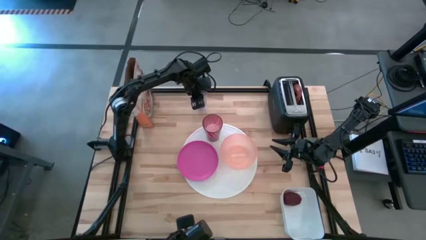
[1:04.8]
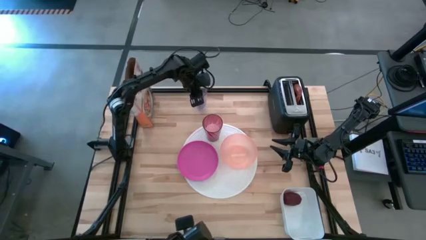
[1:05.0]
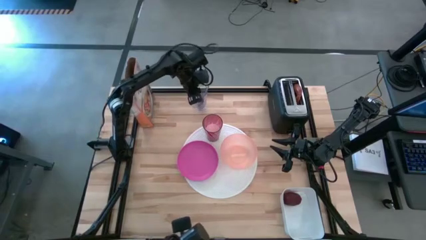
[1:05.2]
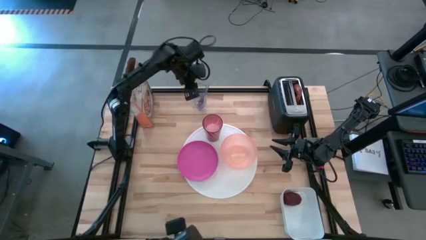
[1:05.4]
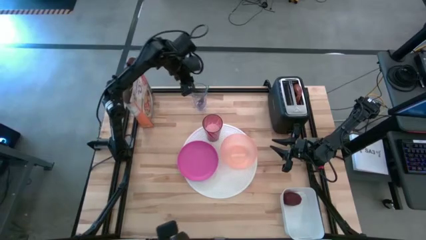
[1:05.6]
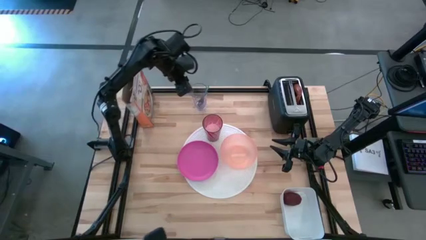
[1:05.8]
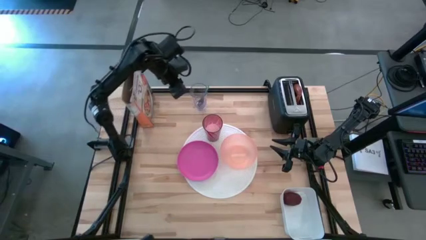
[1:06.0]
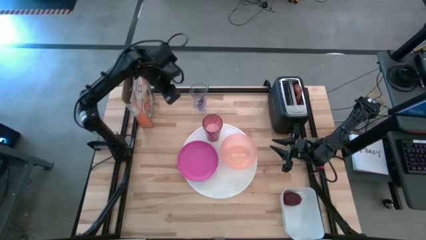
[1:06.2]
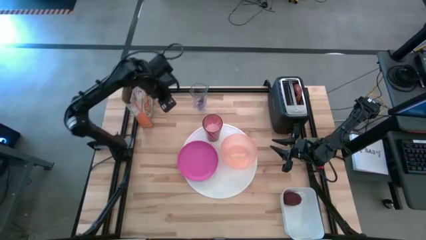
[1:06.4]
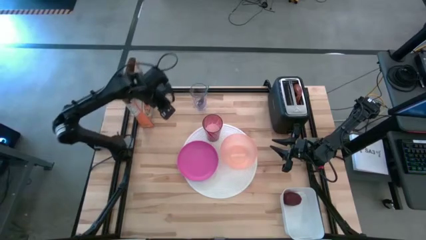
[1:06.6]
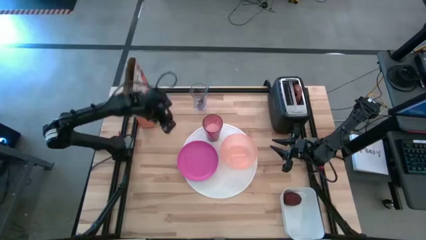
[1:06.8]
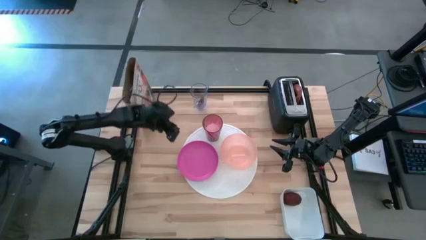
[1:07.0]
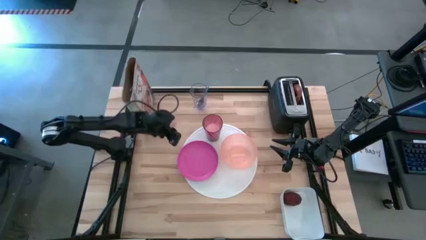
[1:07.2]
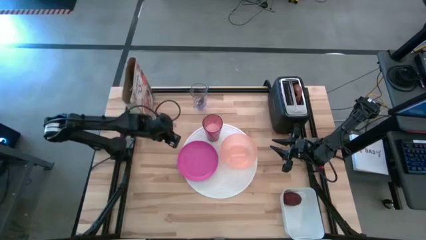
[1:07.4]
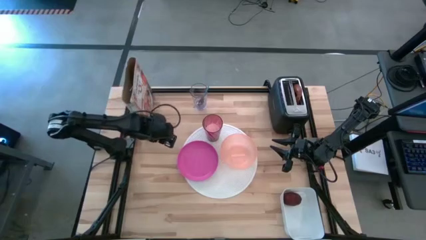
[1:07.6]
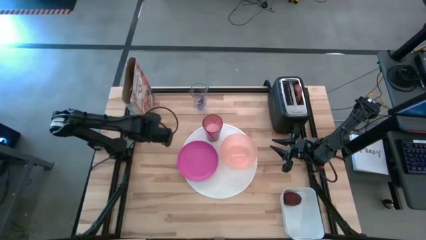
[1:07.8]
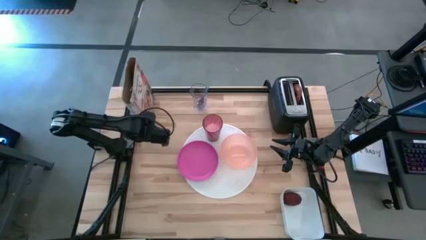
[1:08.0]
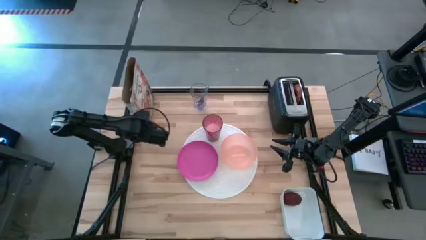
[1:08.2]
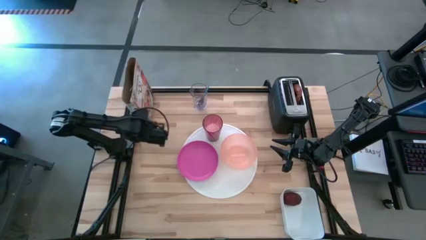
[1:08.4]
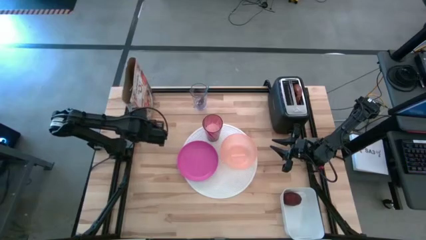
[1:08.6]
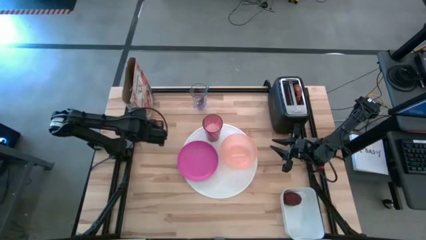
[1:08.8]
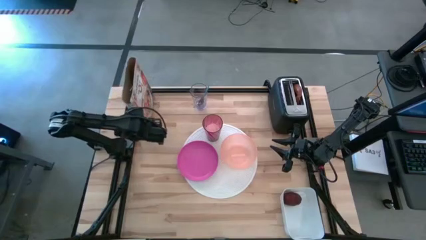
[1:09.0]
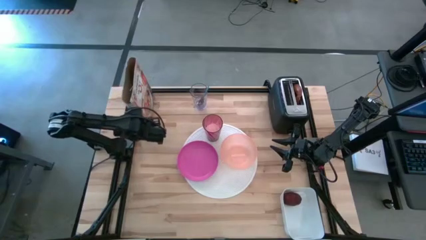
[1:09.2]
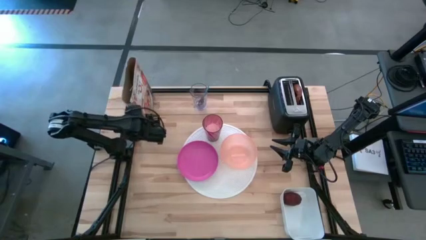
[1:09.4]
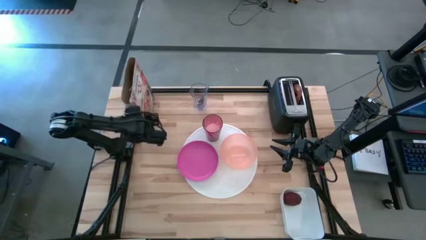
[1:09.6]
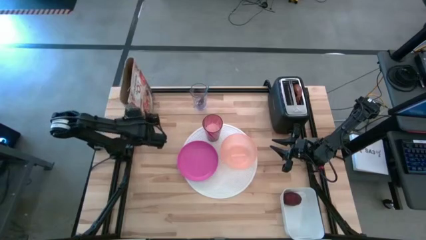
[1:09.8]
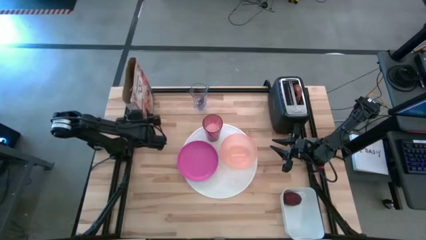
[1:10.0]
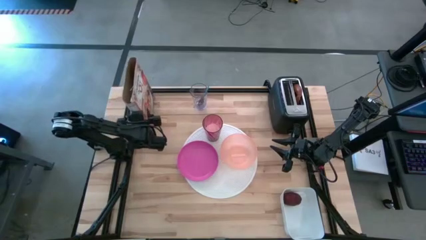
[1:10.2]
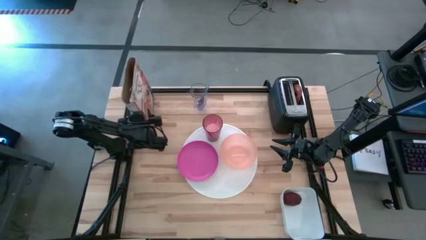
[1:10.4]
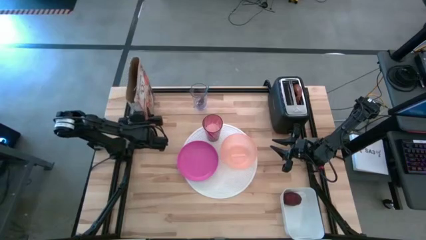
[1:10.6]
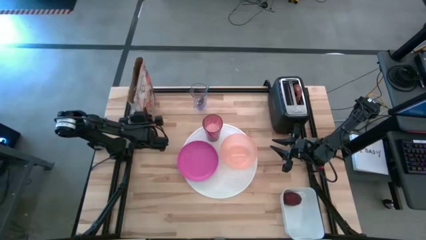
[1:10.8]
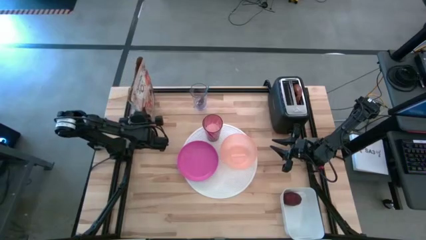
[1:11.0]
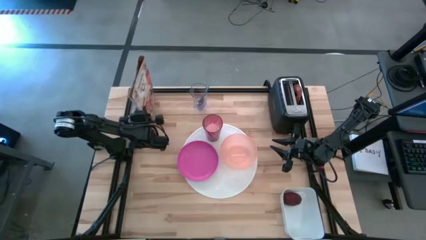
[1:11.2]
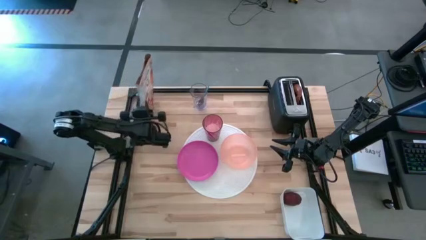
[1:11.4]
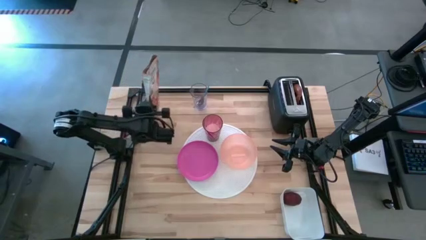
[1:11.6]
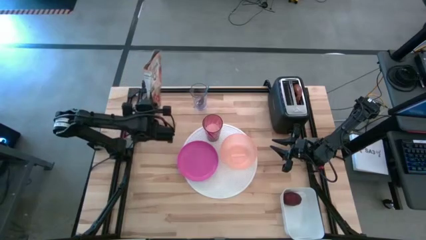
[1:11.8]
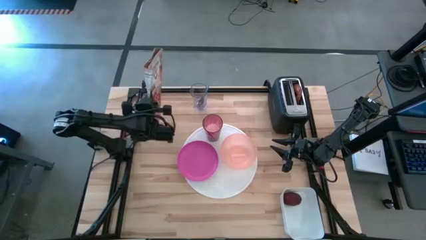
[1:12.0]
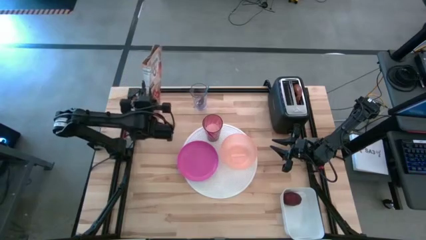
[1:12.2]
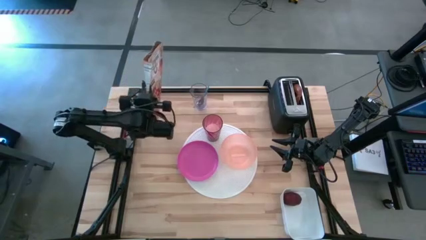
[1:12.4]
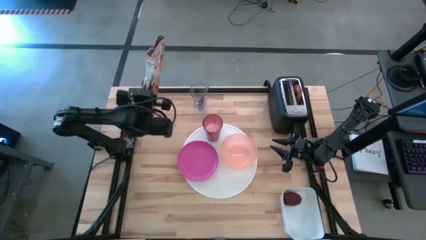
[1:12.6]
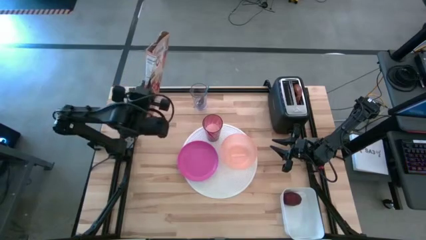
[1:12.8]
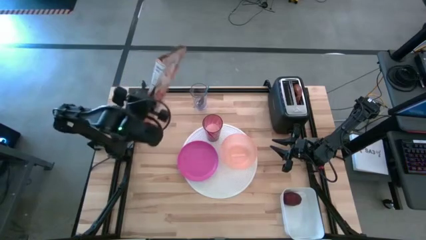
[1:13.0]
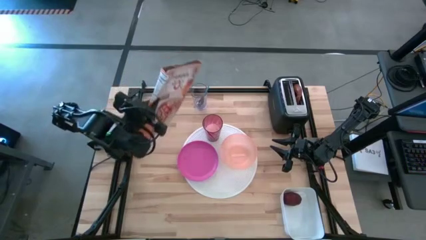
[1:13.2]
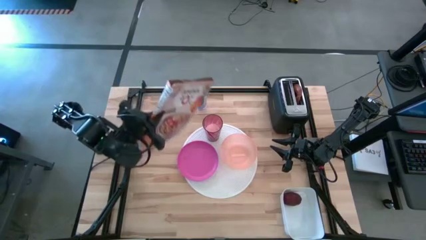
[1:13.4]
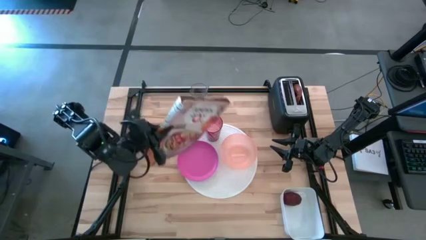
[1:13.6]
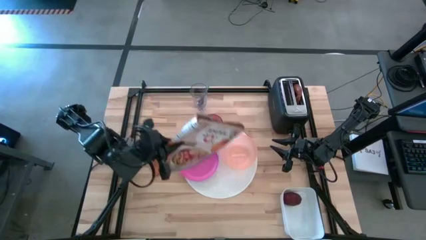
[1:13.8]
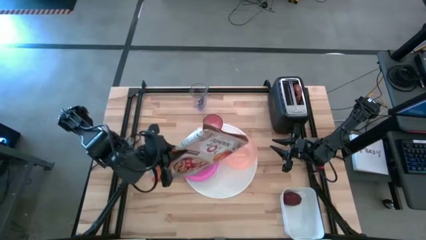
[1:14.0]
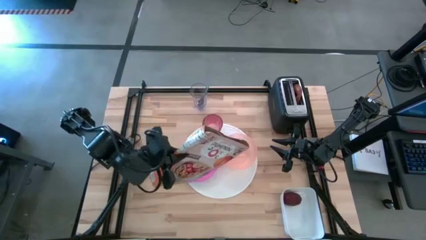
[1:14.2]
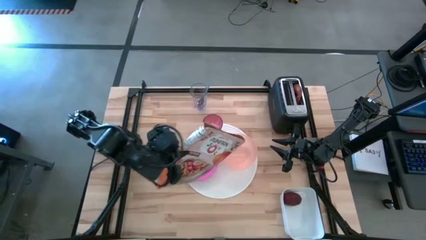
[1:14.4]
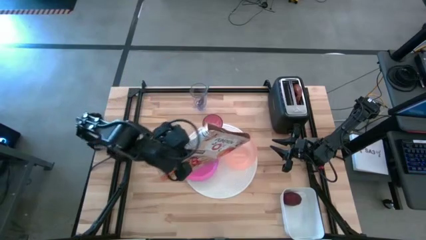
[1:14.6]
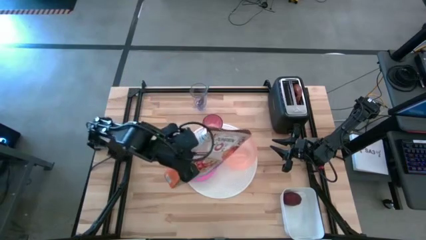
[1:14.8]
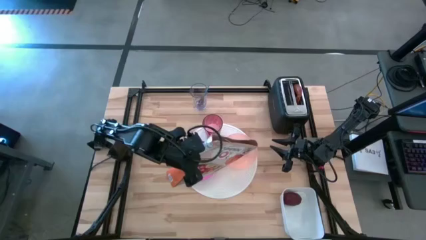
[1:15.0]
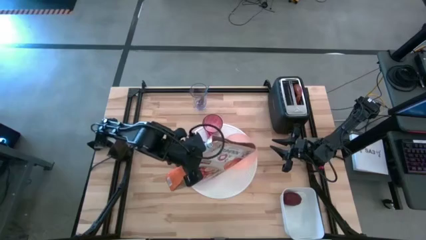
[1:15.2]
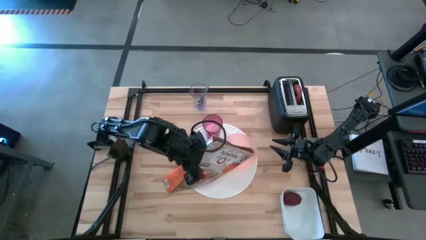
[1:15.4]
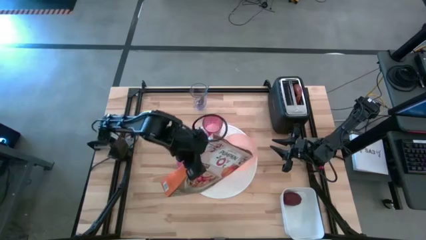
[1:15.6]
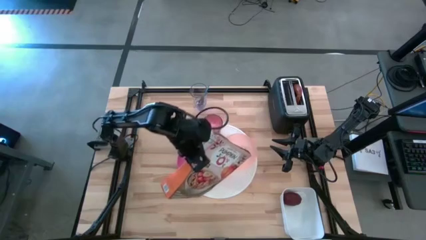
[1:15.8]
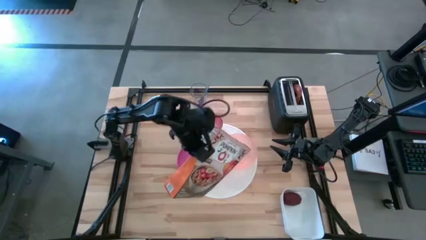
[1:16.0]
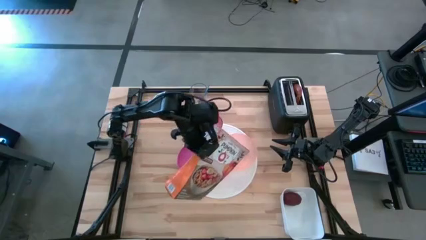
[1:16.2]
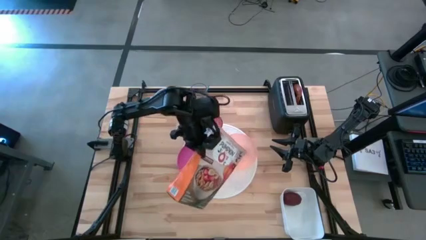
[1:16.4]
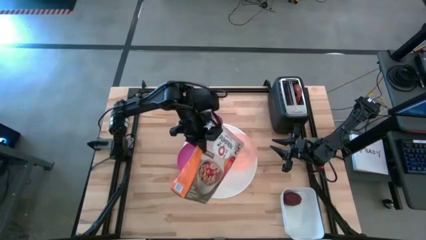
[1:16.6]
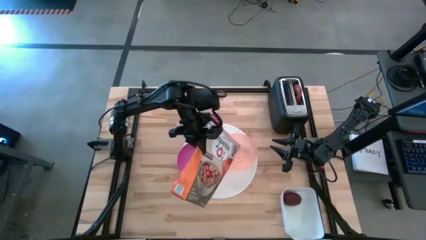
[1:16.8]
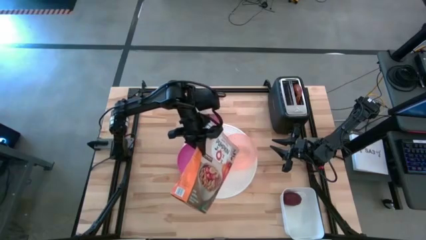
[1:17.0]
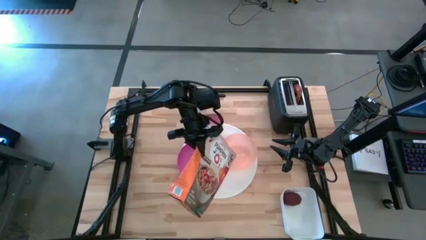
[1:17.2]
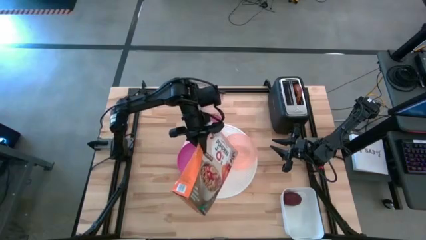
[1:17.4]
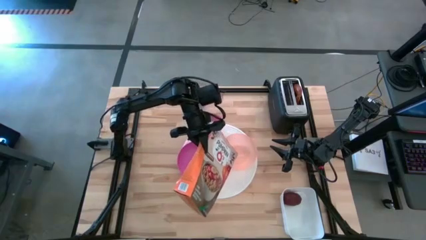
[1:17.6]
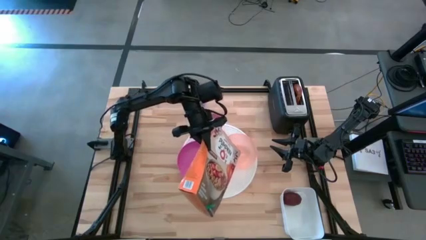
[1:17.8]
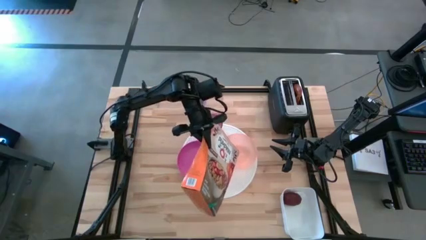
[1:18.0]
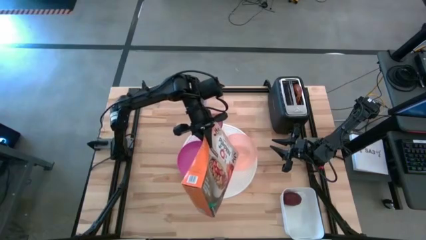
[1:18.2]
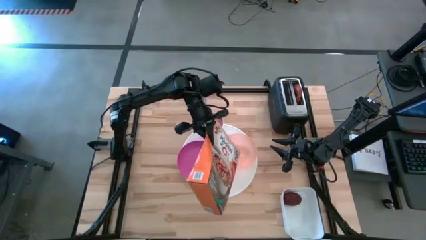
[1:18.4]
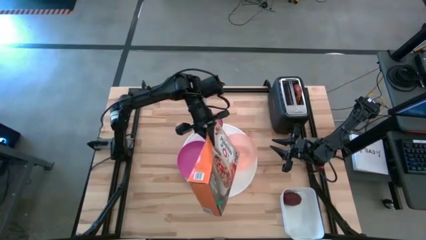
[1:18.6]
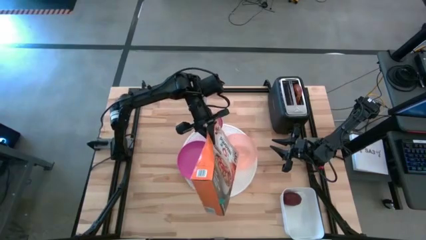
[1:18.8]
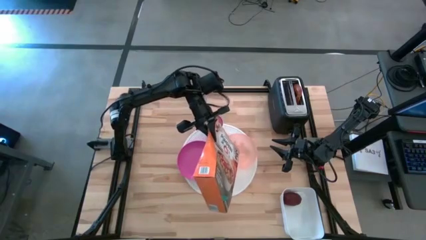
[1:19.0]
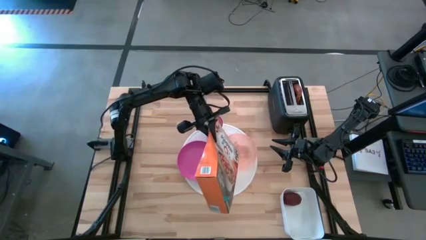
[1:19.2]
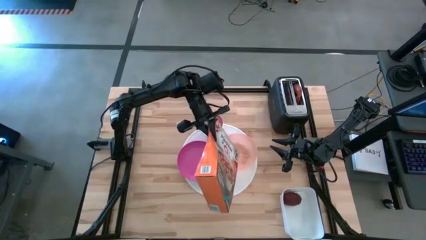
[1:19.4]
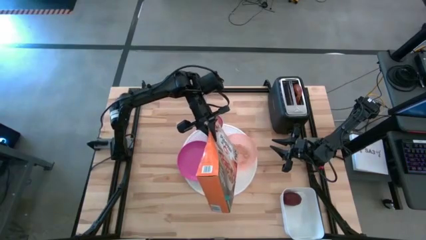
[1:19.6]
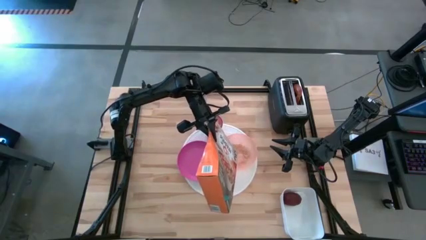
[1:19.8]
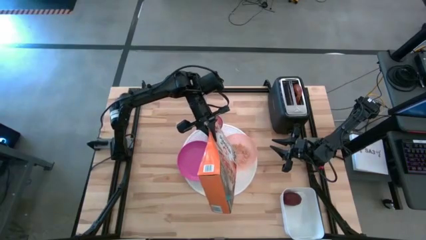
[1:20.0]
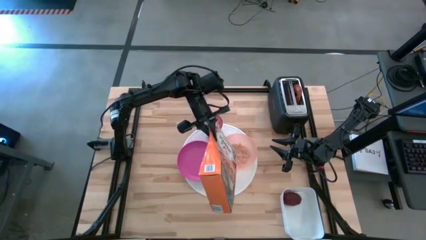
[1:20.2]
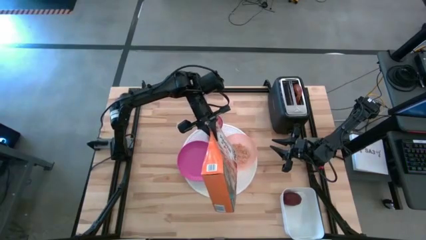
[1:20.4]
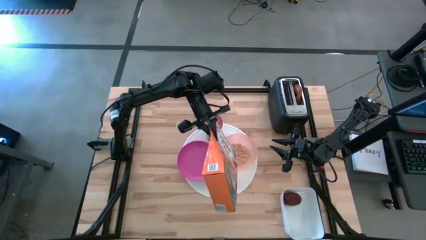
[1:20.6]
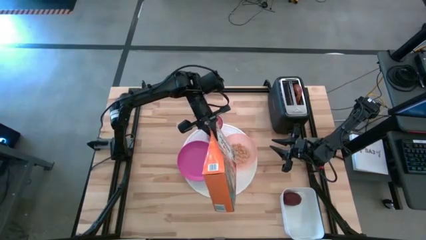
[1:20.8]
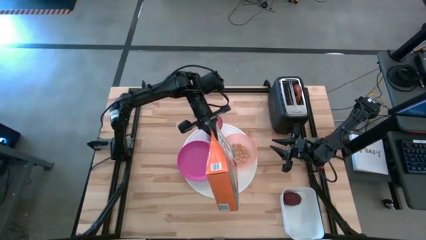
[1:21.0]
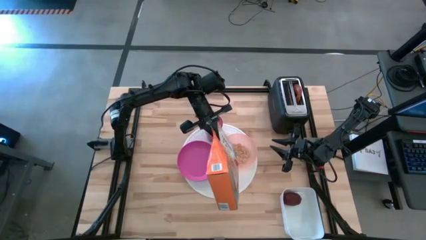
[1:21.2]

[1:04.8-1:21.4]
Task: Arrange a breakfast setting
Pour the cereal from the cereal box into the orange bowl on the placemat
